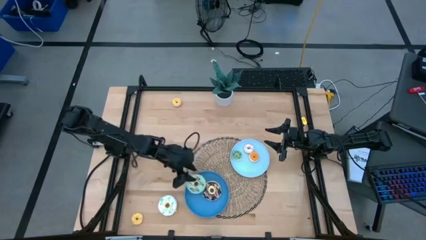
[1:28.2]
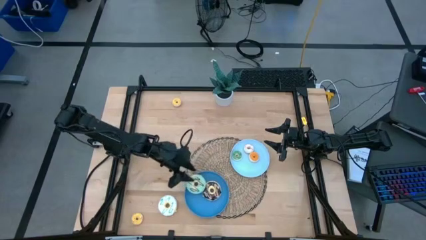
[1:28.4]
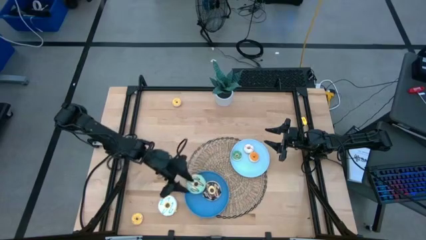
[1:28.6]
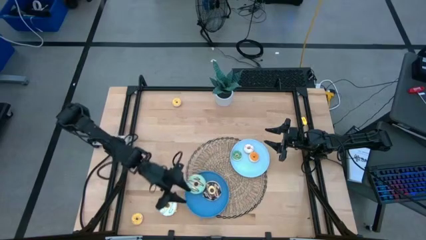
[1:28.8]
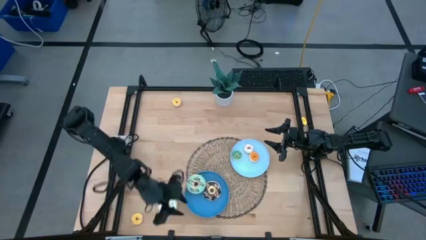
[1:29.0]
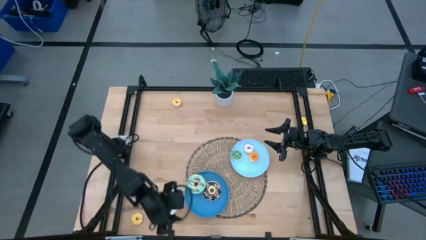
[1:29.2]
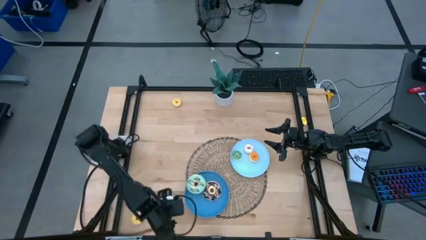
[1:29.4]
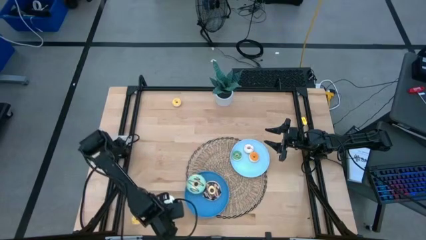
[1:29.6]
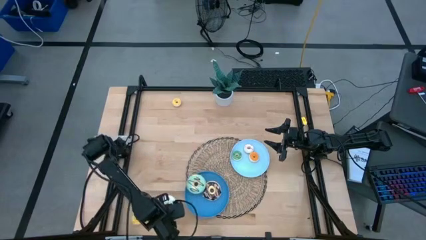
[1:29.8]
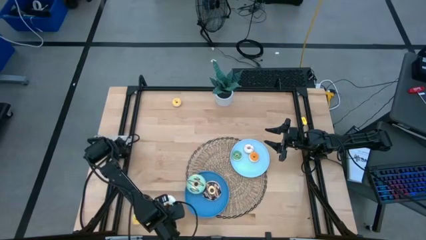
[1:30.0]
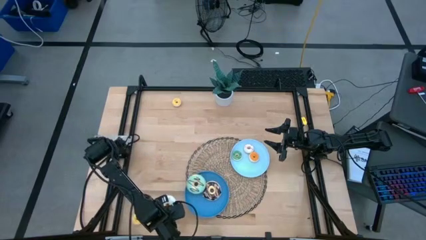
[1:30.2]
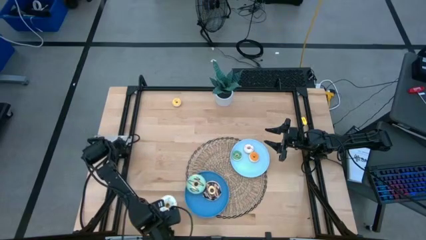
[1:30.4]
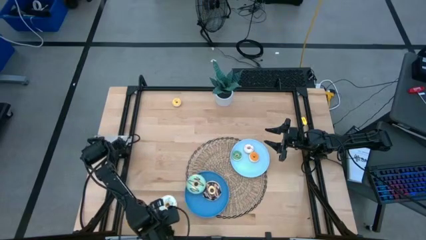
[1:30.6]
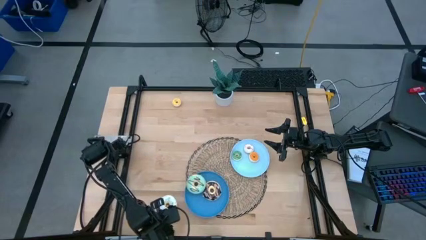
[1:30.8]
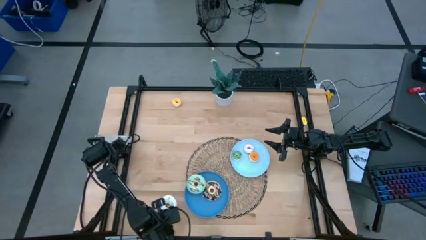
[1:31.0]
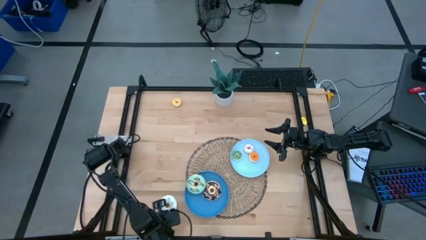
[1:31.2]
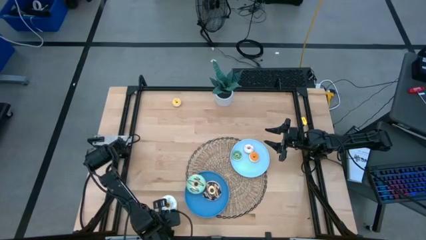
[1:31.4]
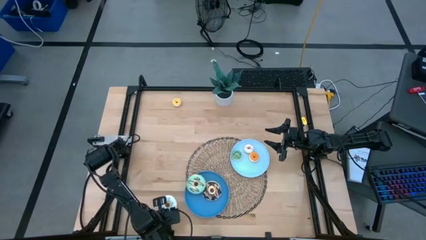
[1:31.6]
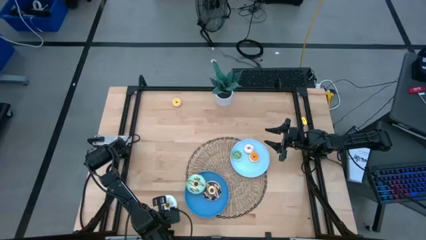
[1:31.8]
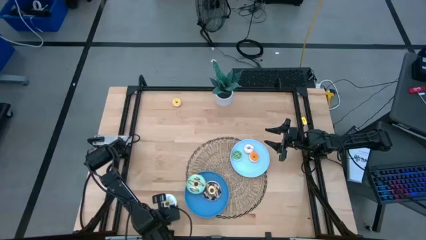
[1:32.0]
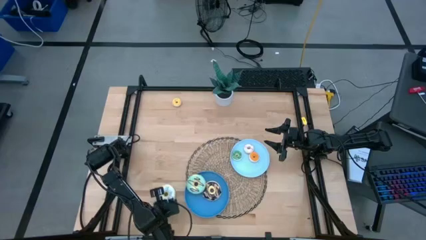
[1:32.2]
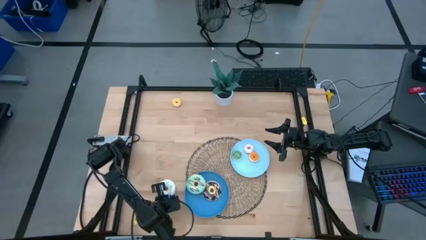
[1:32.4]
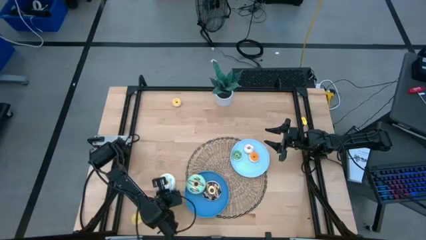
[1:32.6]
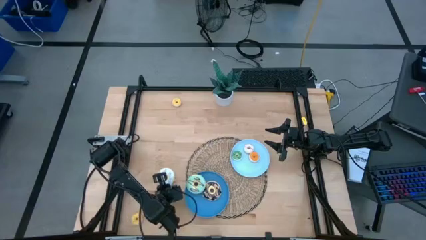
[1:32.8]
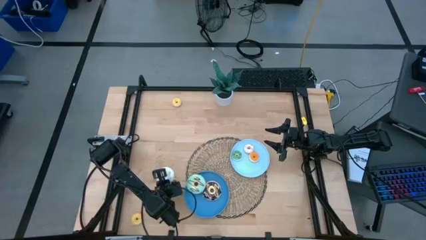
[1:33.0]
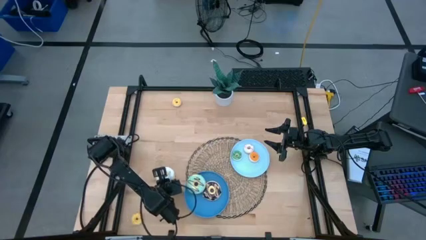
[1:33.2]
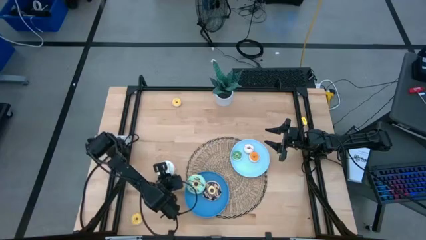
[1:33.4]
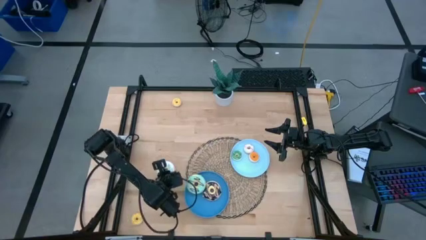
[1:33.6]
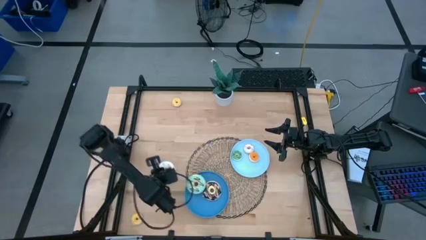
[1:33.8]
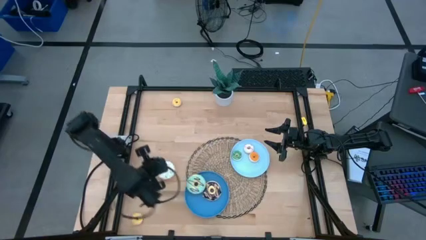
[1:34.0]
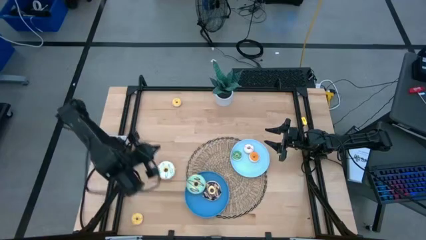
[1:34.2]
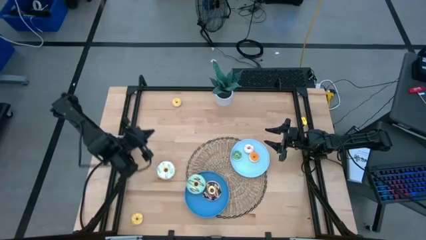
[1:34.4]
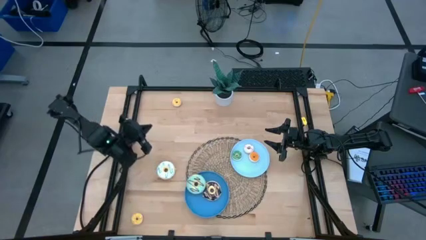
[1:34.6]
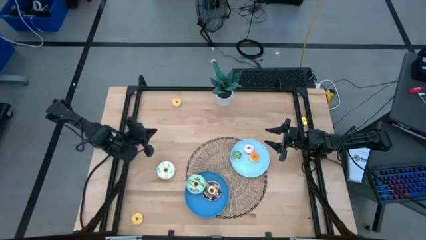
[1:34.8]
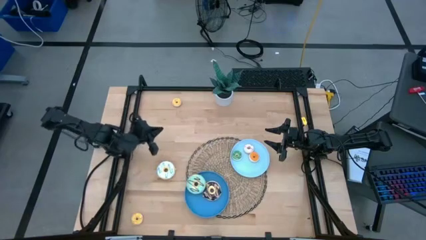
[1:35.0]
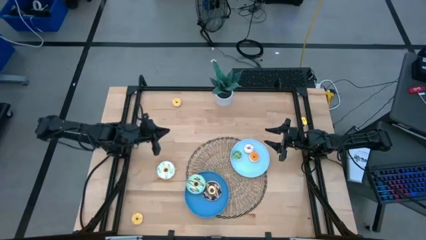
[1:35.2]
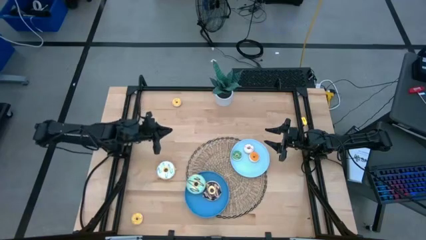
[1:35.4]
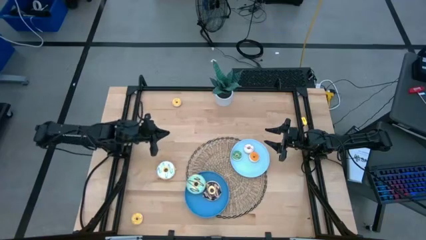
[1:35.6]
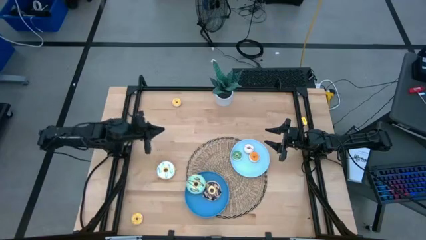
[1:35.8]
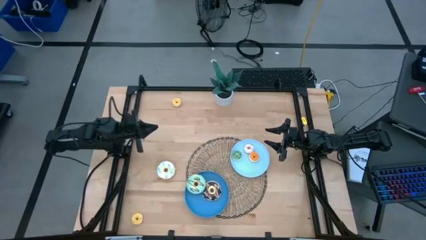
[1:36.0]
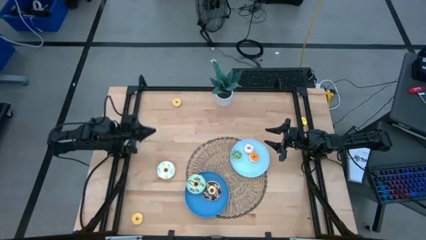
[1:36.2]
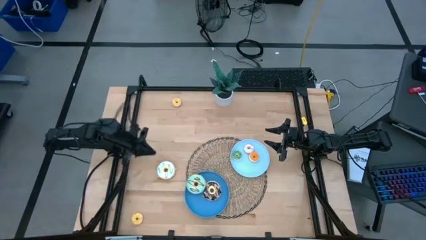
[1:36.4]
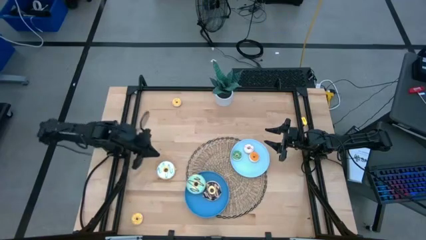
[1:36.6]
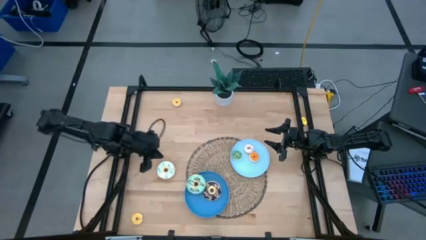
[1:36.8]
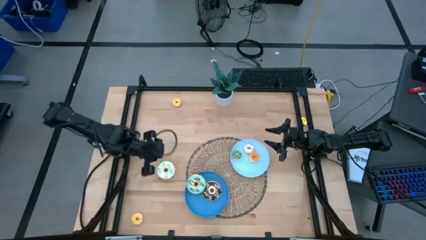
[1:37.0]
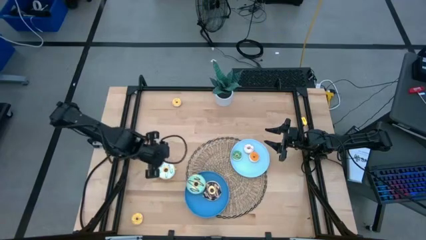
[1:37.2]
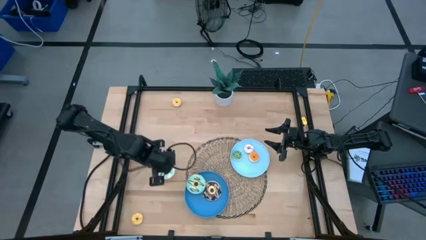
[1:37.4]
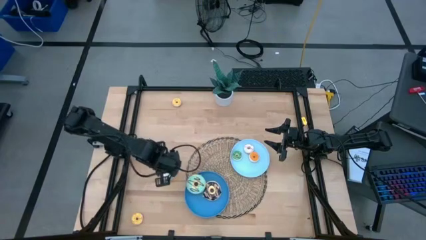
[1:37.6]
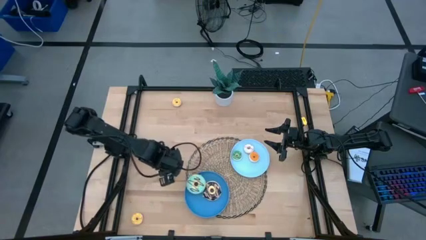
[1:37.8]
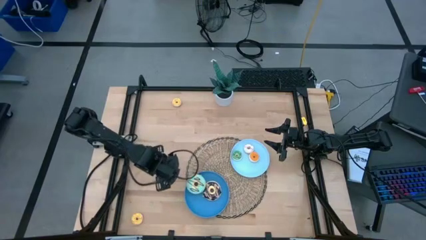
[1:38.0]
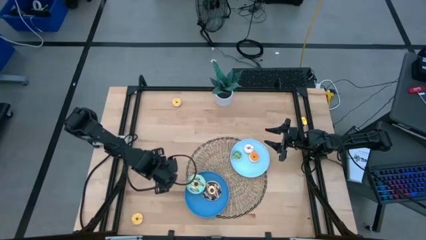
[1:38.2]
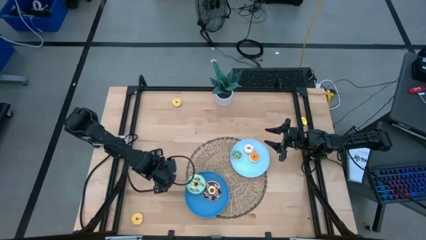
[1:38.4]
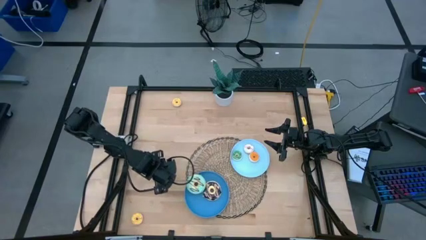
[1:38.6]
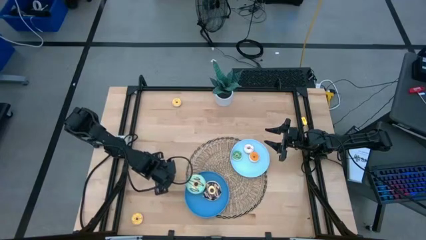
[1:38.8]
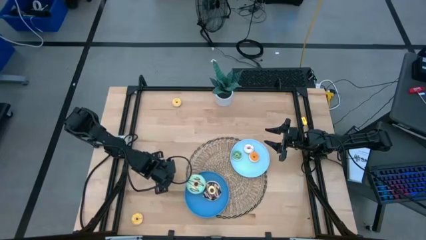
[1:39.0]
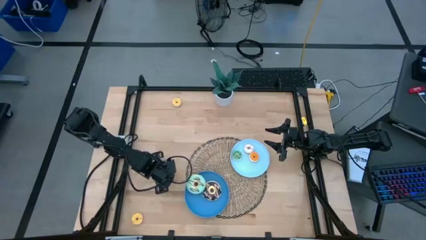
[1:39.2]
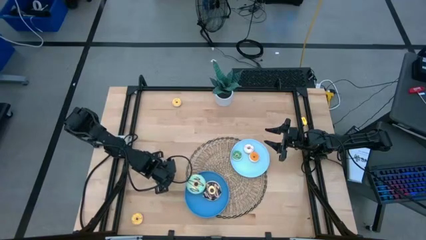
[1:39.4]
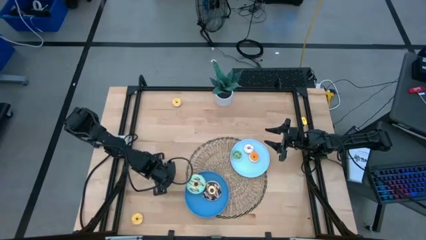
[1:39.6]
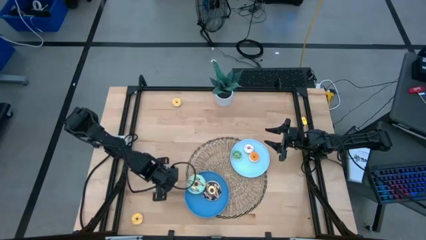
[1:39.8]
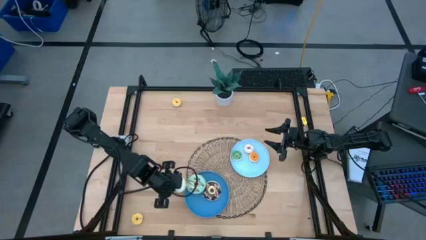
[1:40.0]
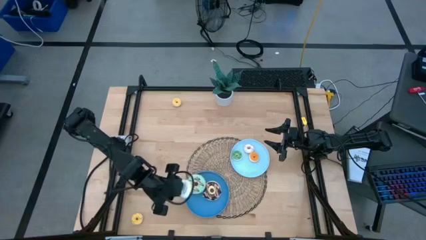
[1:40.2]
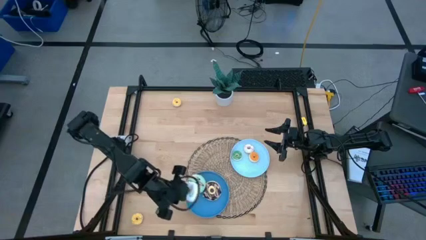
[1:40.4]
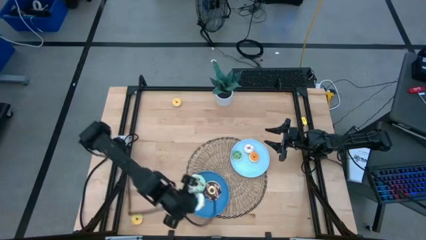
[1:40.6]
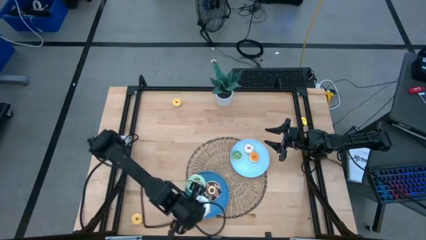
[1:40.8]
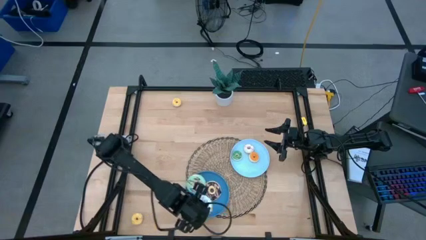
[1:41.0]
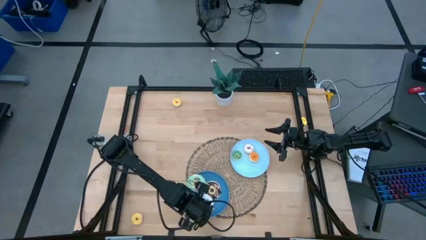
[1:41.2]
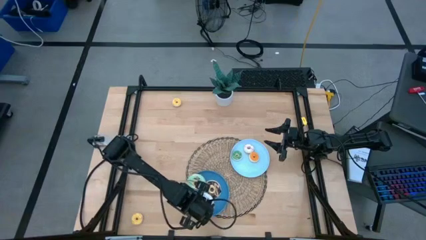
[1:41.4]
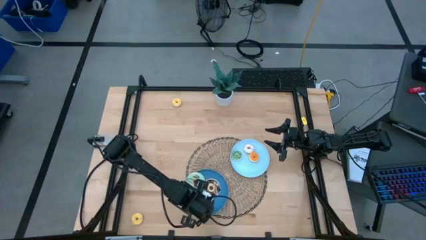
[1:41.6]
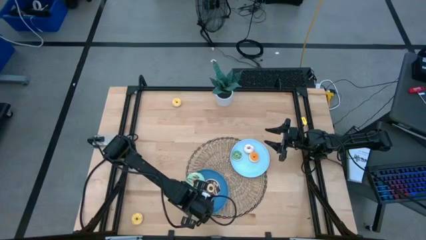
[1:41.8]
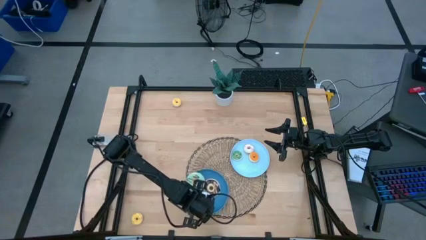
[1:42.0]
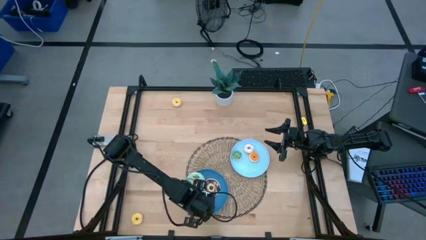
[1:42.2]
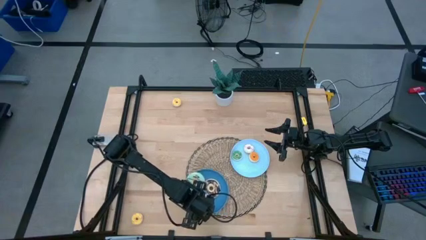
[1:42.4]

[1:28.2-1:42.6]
Task: Pick & Place donuts
Put the large white donut on the blue plate
